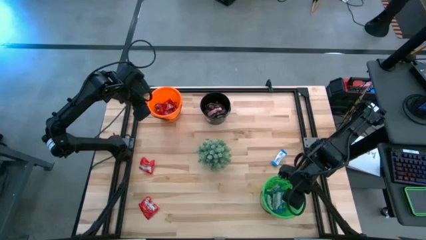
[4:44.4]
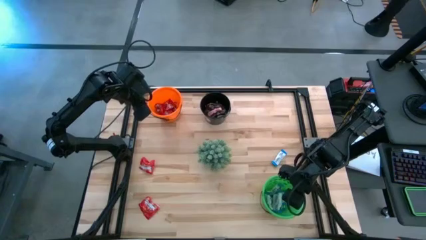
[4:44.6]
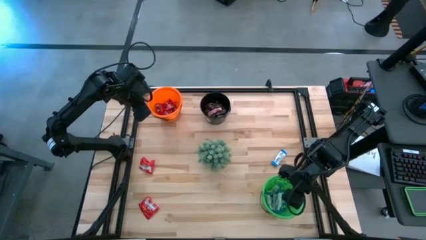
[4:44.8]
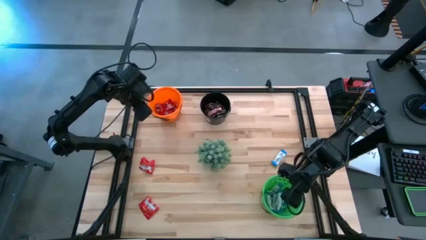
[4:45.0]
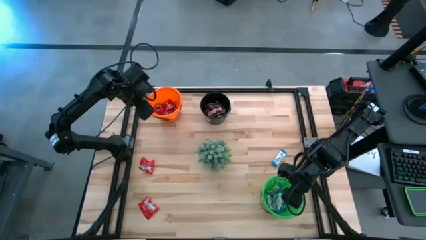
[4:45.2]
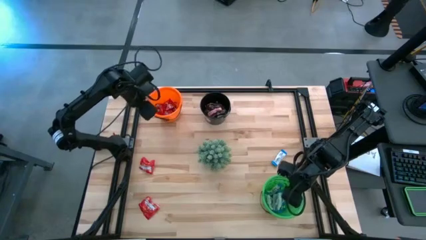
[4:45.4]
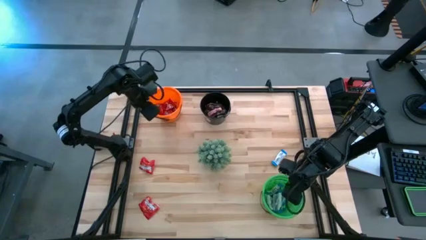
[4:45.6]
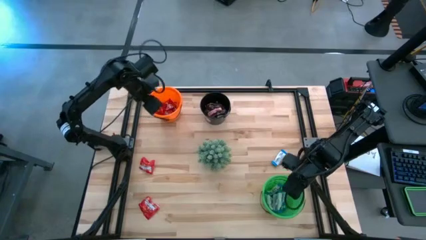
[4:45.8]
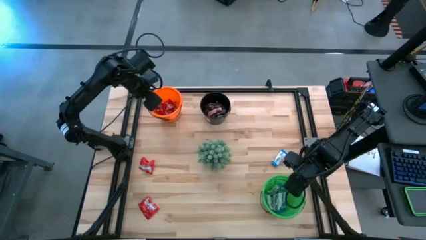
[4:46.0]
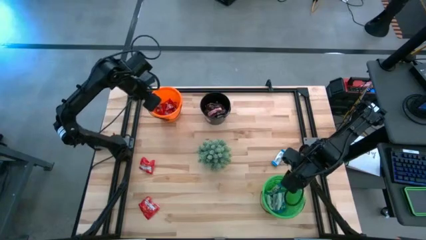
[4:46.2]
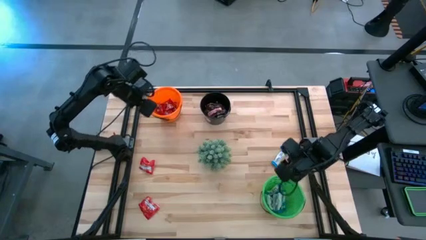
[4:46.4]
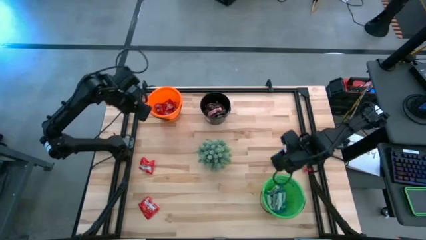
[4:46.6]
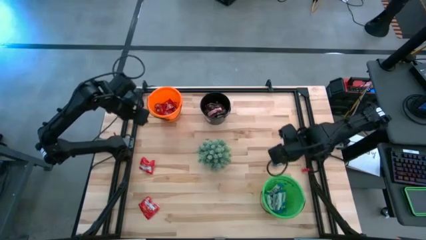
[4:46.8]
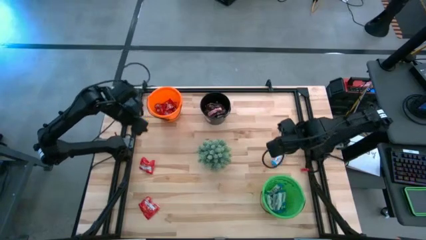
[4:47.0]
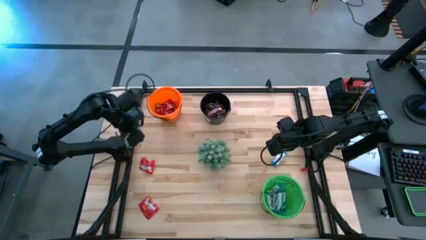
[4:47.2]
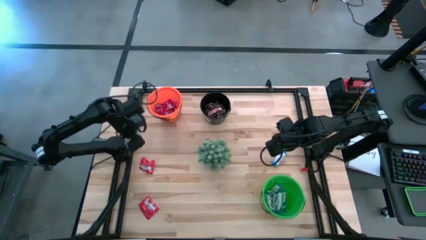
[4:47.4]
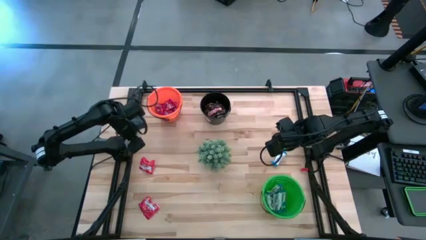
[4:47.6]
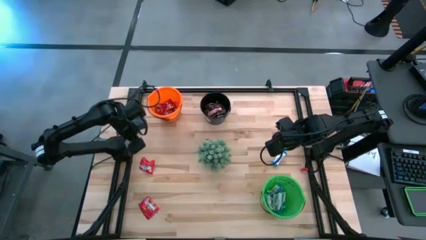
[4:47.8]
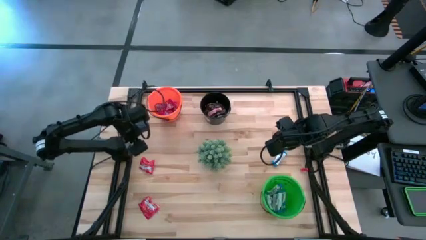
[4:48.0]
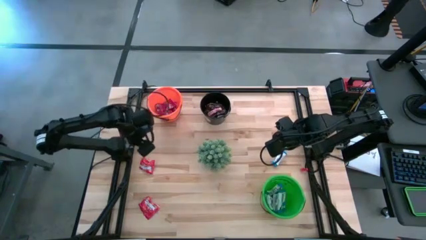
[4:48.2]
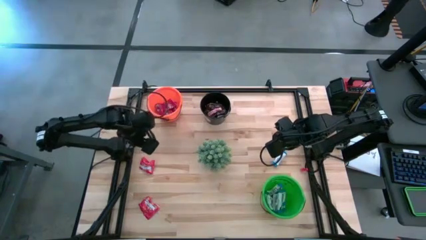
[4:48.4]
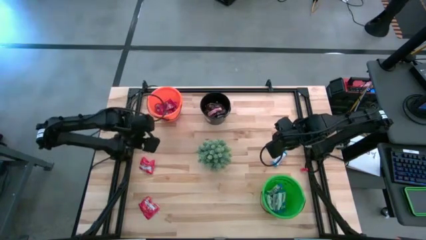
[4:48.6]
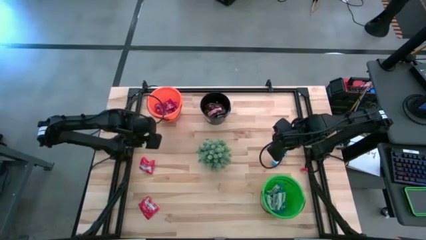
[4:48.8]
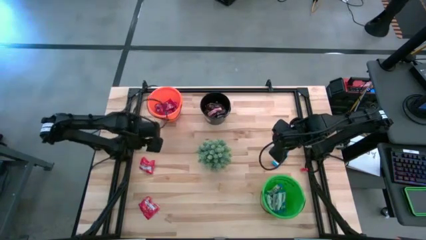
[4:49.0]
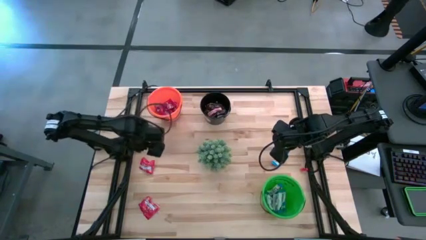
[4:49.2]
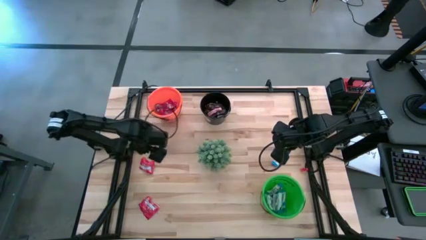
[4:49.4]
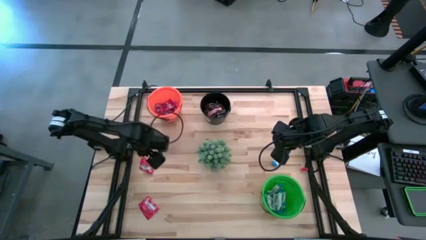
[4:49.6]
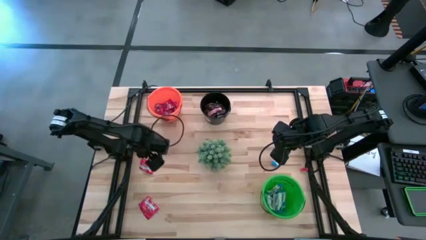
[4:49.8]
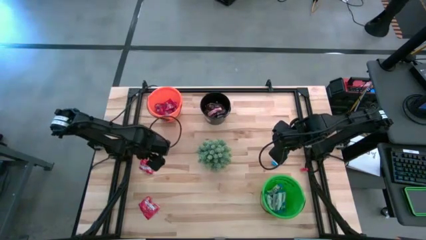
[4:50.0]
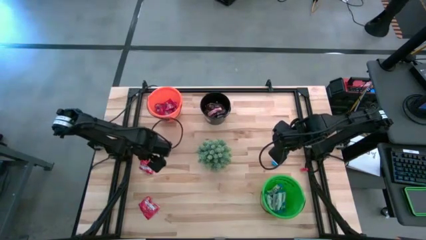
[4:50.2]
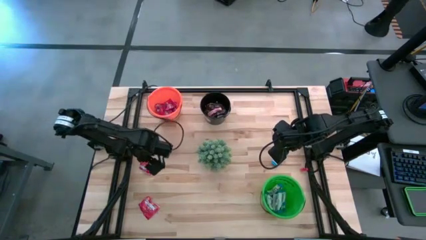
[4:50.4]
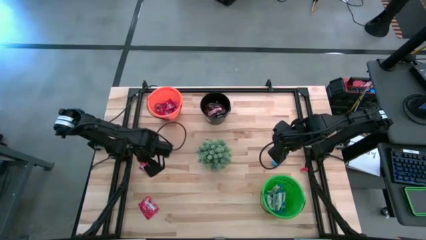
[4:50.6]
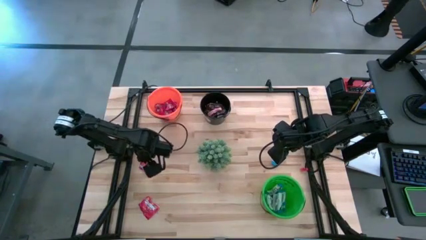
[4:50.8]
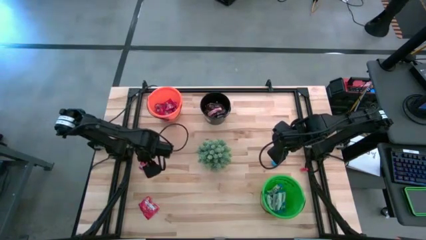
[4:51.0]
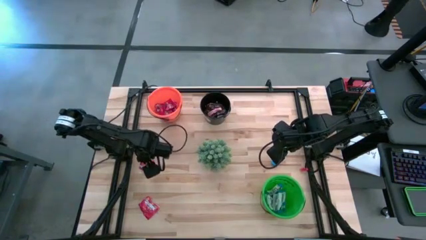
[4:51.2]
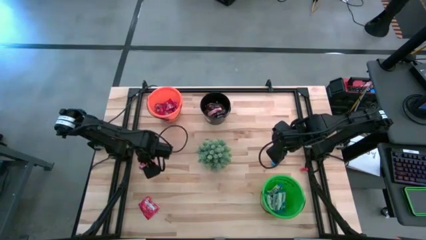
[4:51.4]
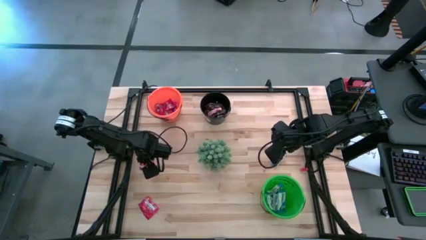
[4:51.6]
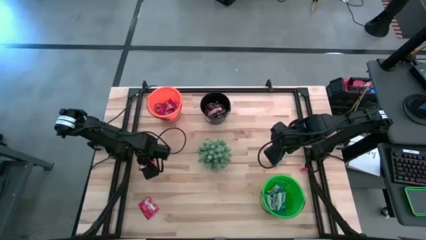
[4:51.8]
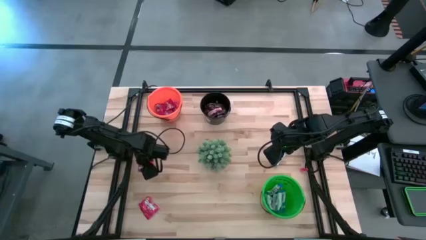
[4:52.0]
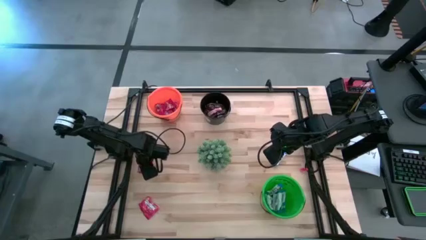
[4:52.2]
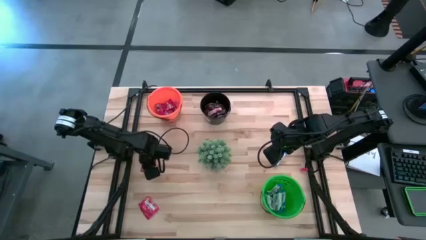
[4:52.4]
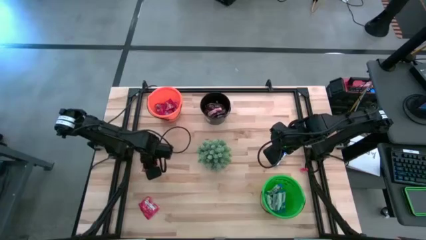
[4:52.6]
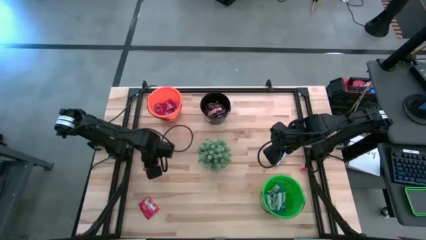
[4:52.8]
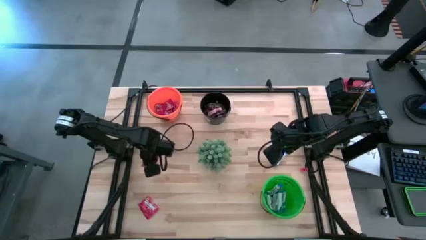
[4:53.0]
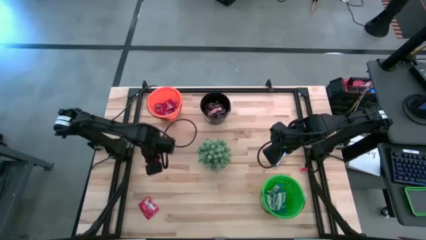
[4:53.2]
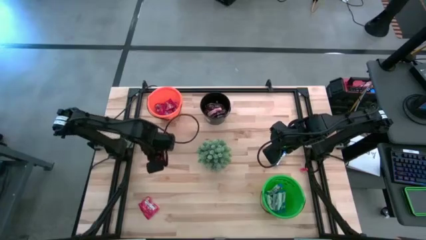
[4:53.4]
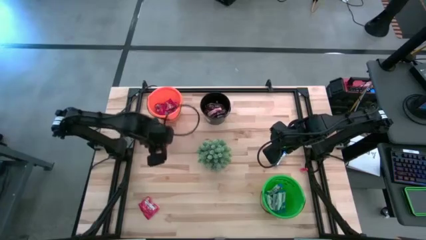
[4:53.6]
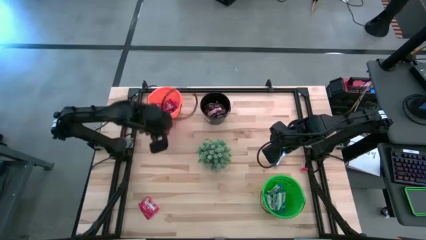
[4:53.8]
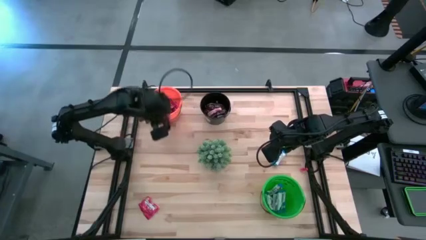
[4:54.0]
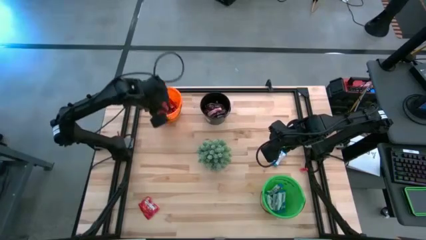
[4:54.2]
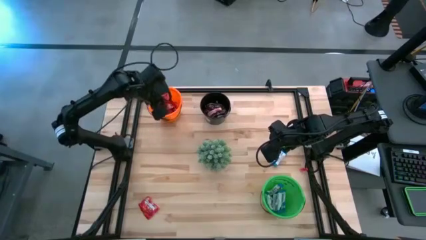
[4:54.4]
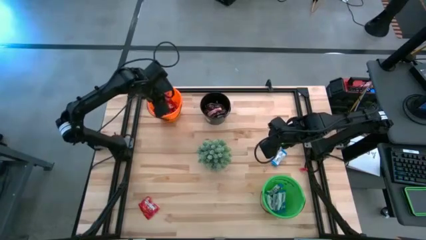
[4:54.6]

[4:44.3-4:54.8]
Task: Sort candy
Put the red candy into the orange bucket

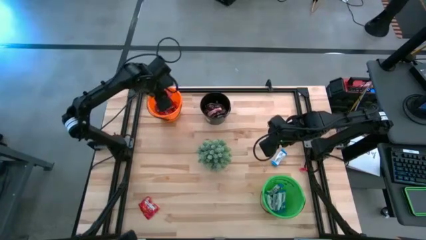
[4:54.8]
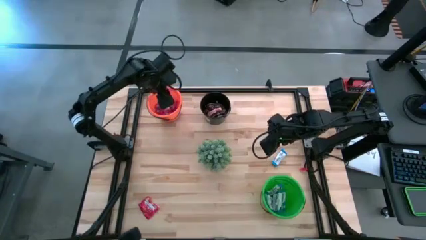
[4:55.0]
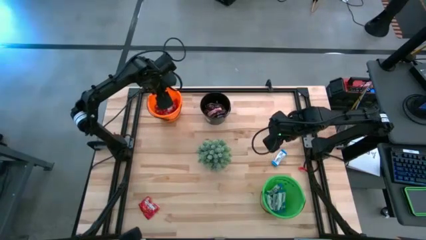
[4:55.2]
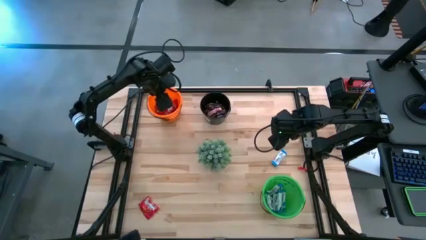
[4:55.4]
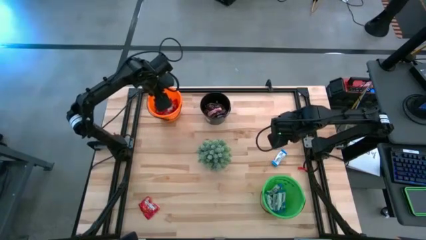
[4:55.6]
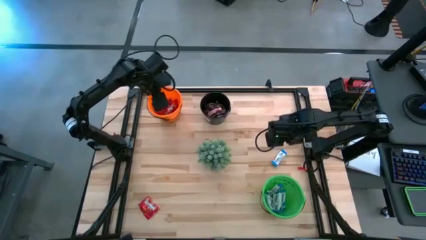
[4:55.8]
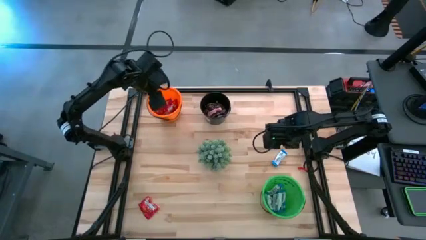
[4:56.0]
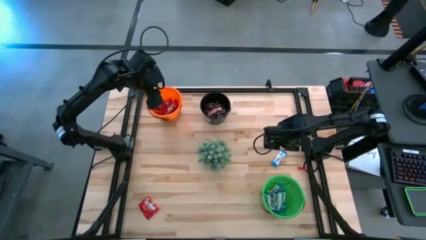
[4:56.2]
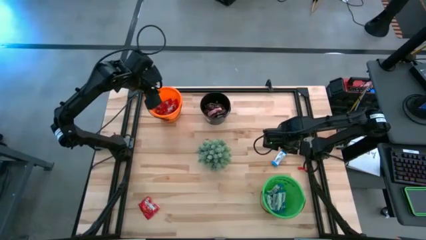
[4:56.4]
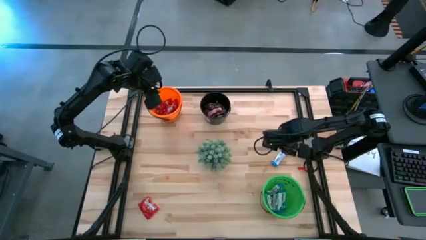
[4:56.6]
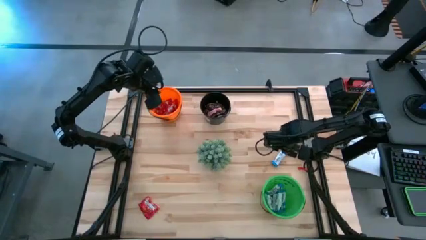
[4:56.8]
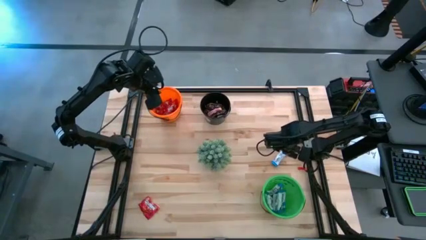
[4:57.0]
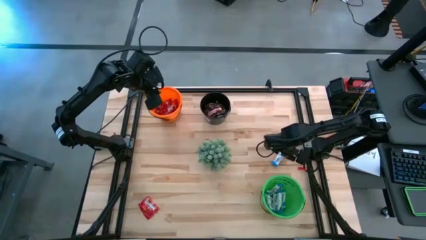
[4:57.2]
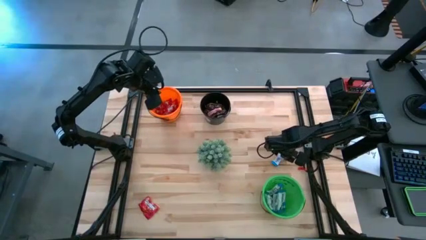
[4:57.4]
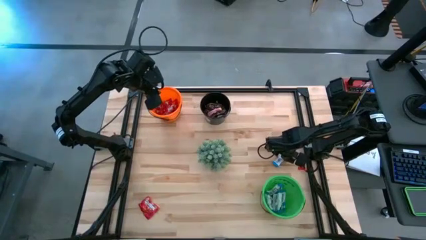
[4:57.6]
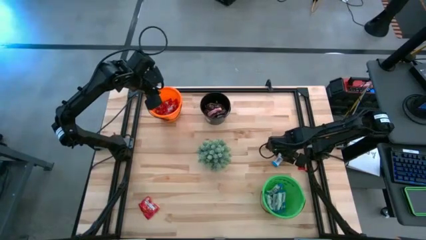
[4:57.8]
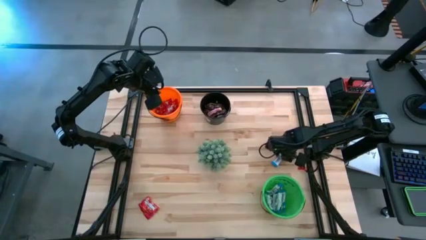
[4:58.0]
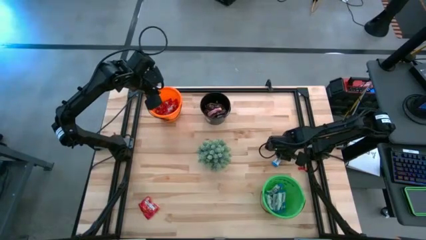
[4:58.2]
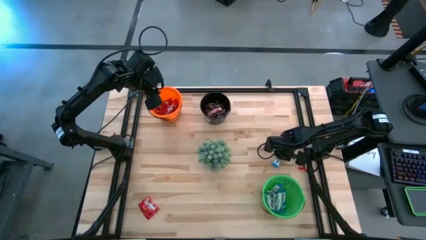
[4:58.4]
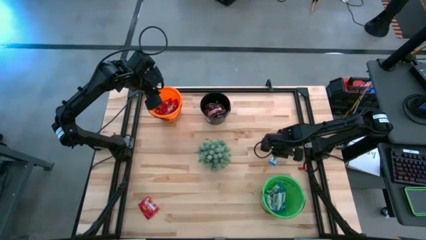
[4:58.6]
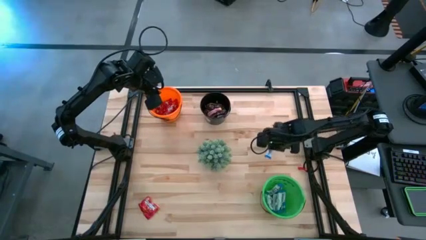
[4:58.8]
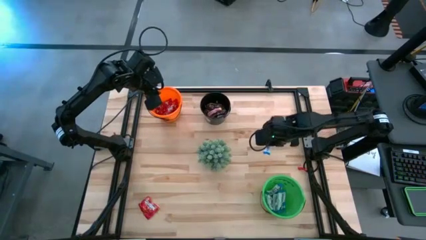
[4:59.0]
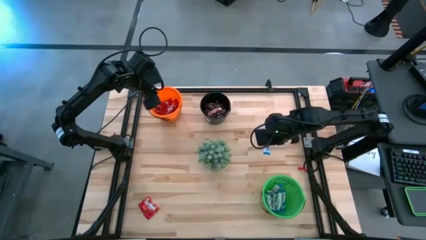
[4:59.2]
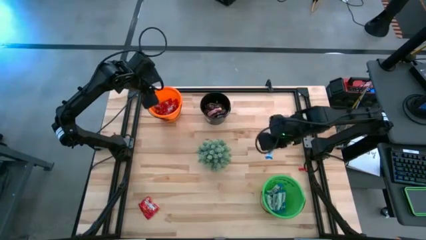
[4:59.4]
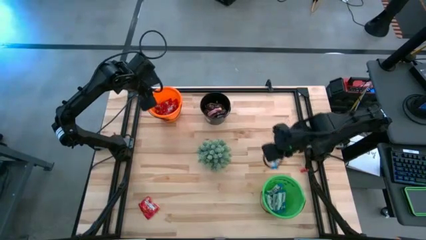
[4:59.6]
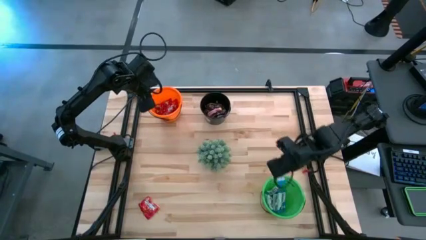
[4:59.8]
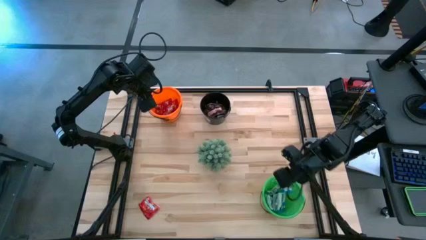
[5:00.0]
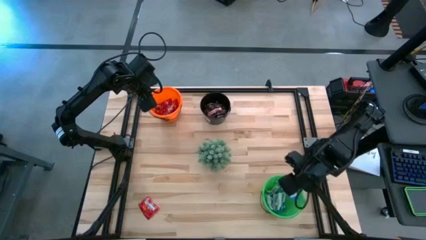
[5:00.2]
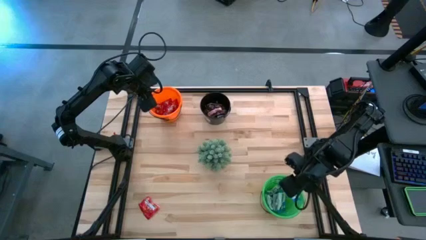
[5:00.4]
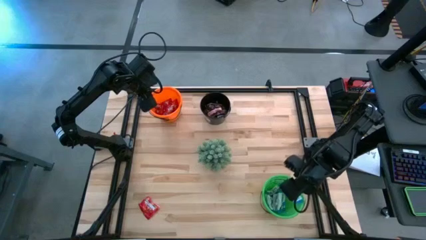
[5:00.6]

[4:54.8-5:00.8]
Put the blue chocolate into the green bucket
